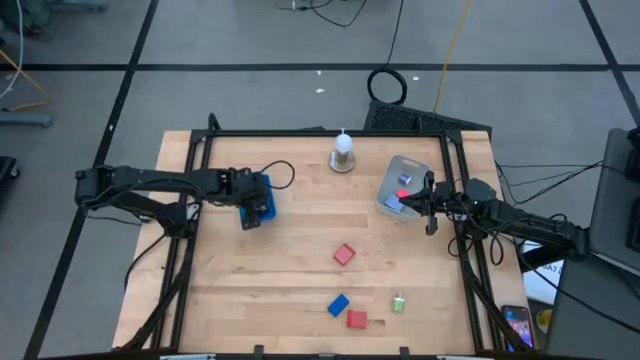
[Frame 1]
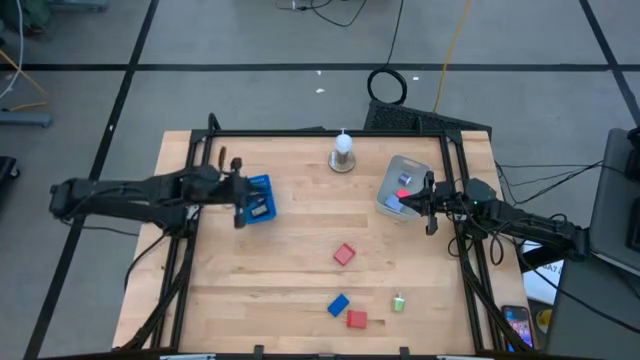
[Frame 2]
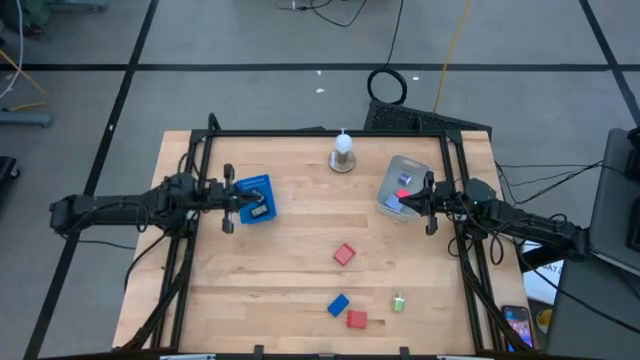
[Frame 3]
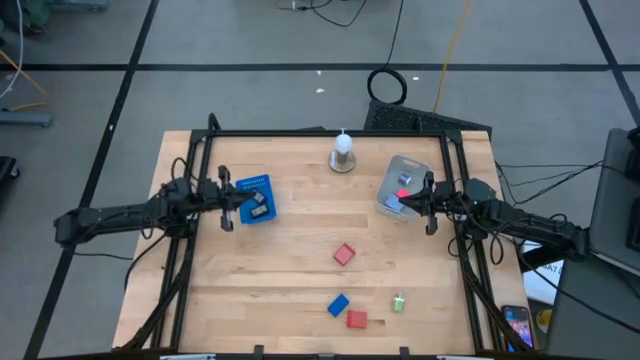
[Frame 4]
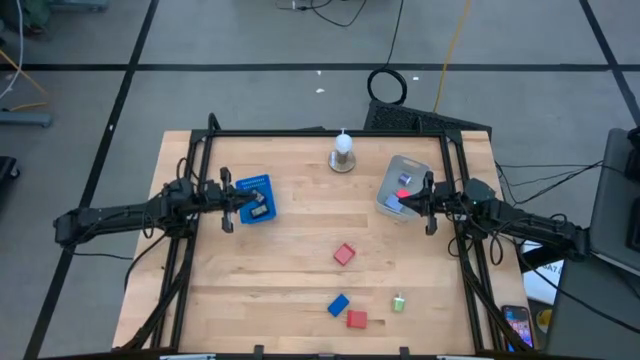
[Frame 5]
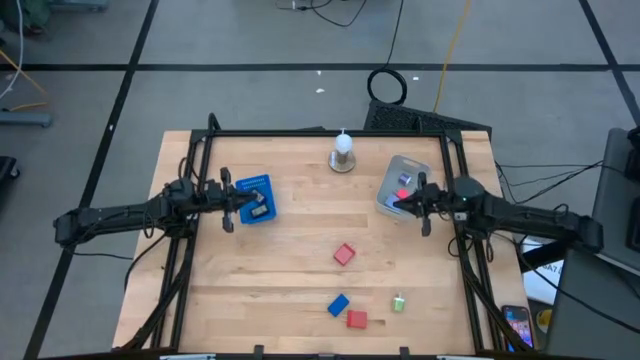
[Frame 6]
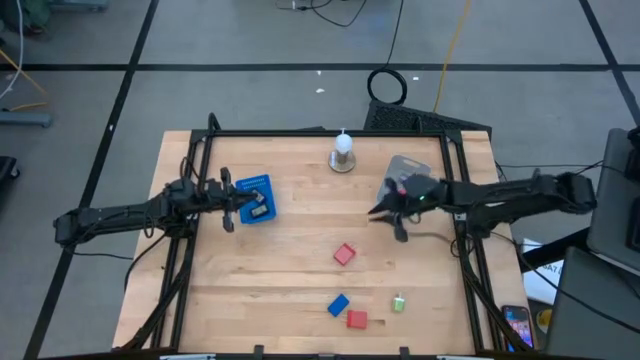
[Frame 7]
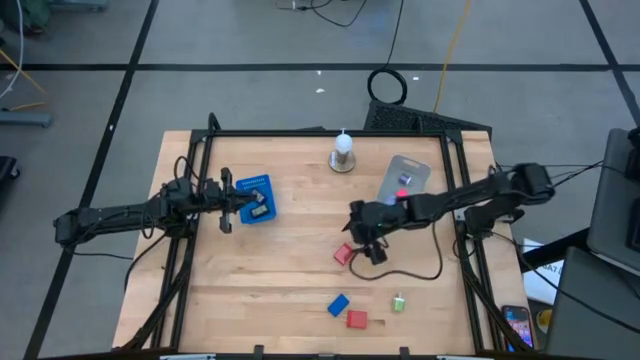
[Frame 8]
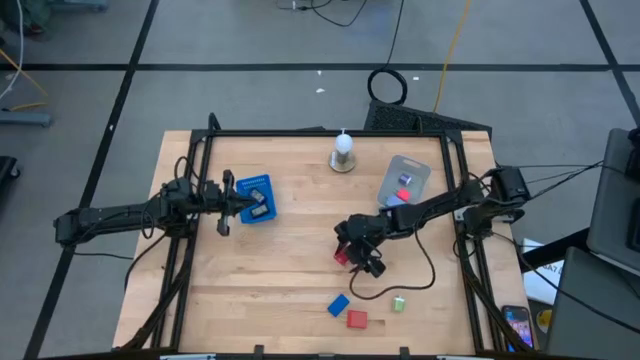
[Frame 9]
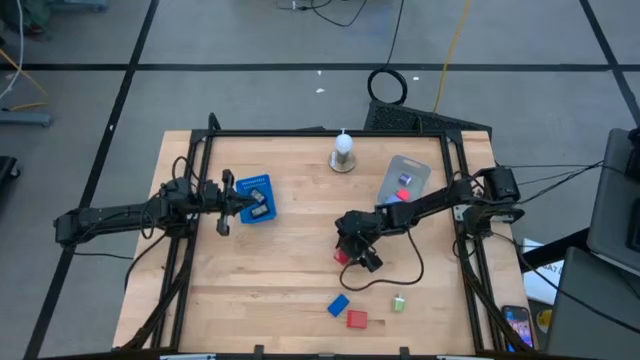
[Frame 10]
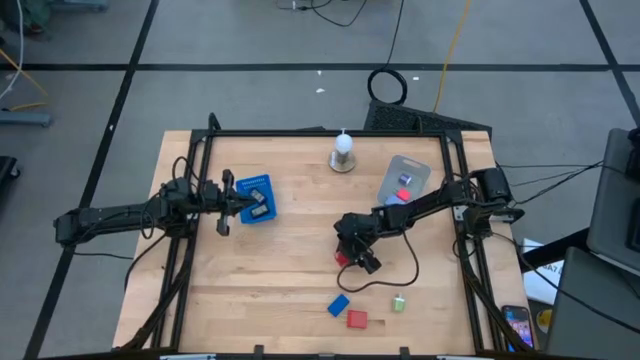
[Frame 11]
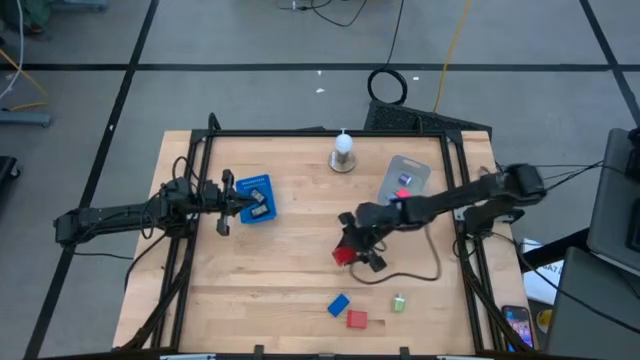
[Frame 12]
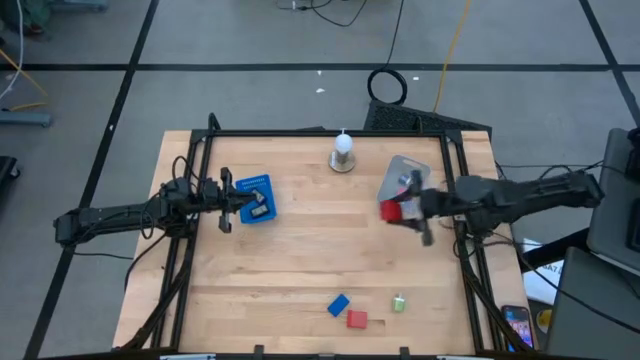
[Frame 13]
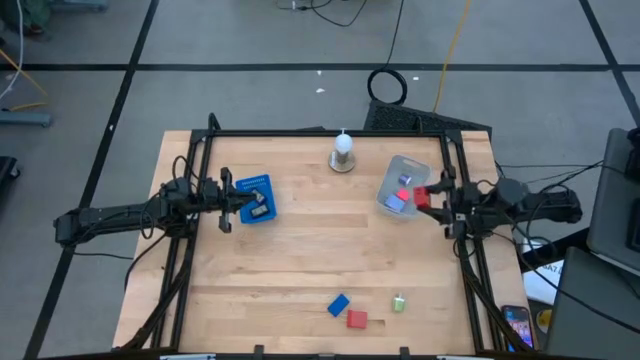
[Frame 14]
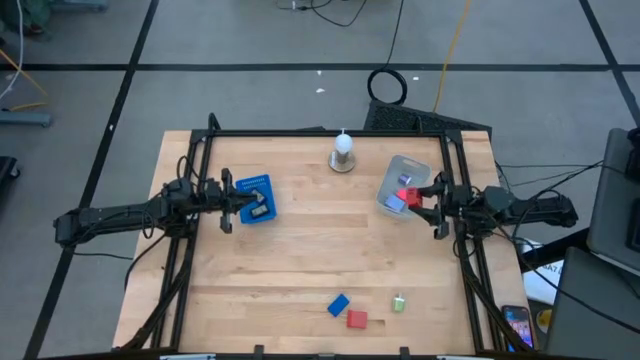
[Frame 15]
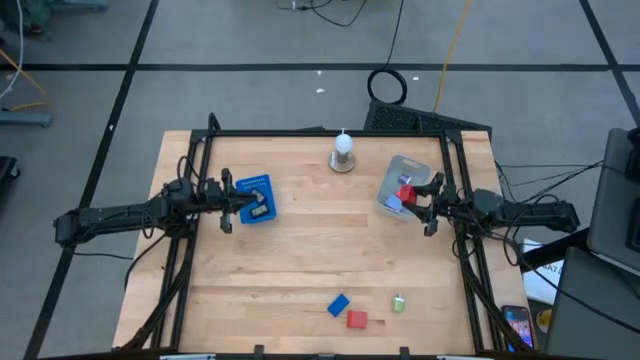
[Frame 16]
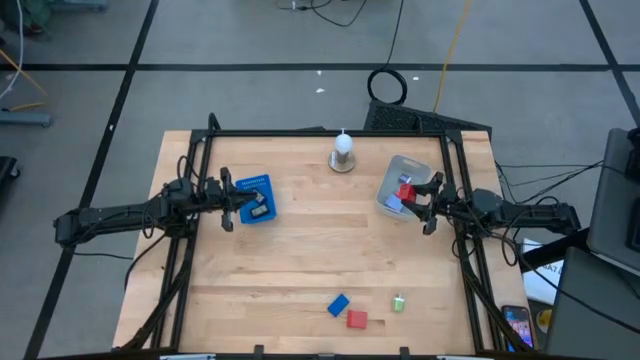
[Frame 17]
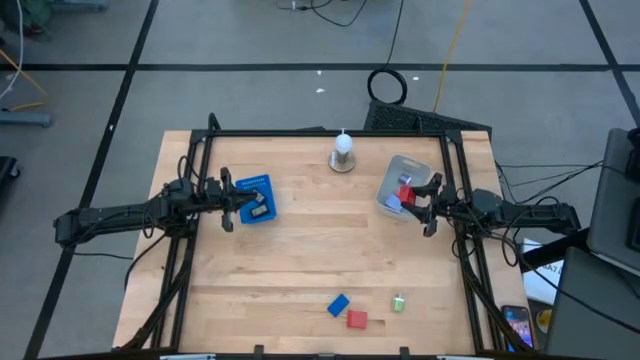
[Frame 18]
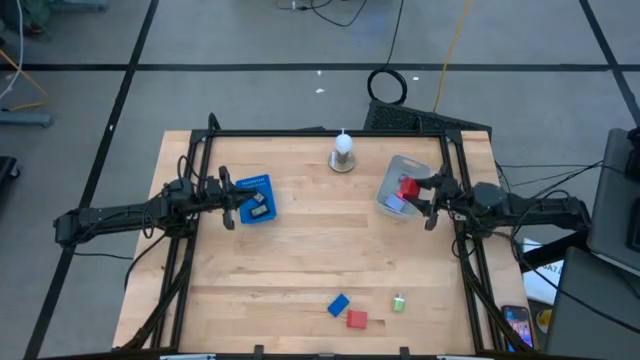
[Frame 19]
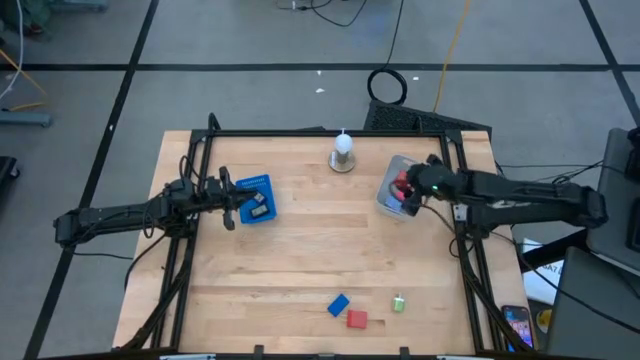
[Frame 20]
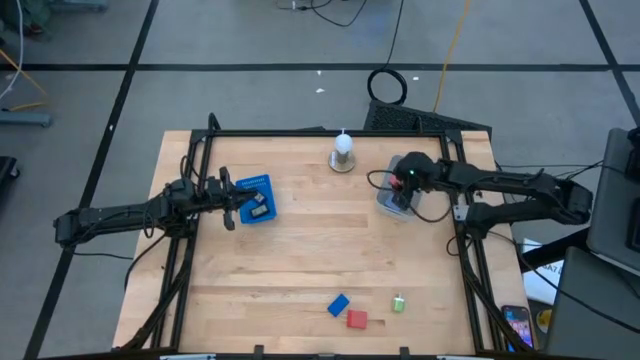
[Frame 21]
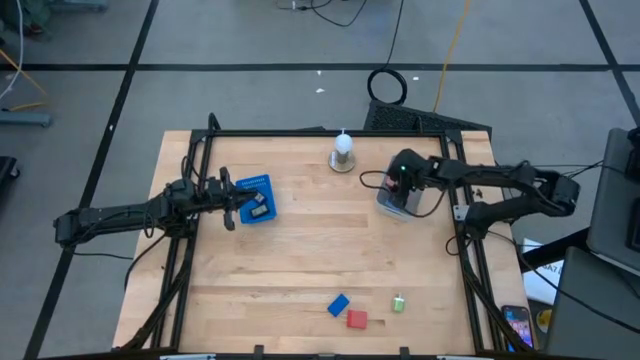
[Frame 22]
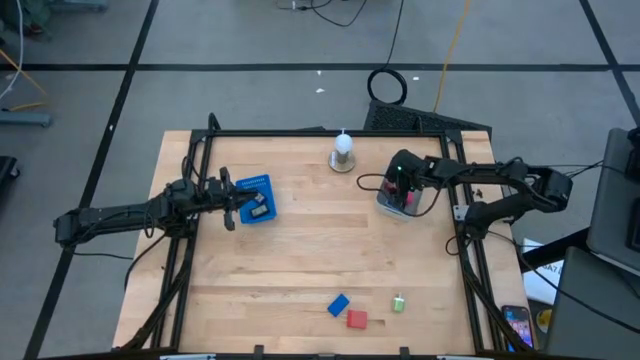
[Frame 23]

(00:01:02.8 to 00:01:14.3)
Task: Pick & Place Office items
Put the top red charger adapter into the gray bin

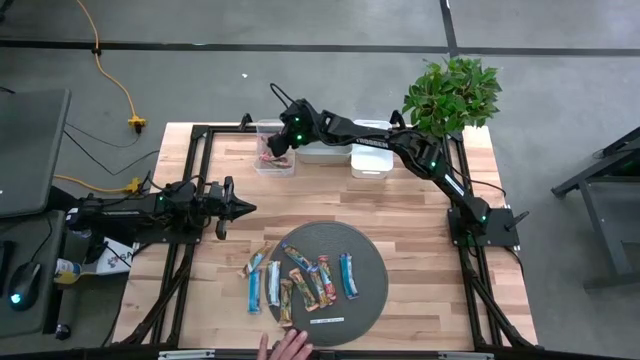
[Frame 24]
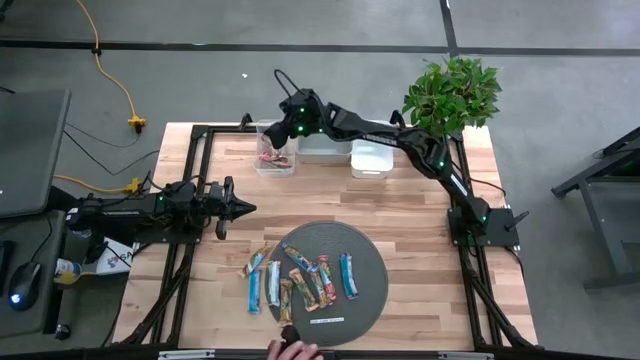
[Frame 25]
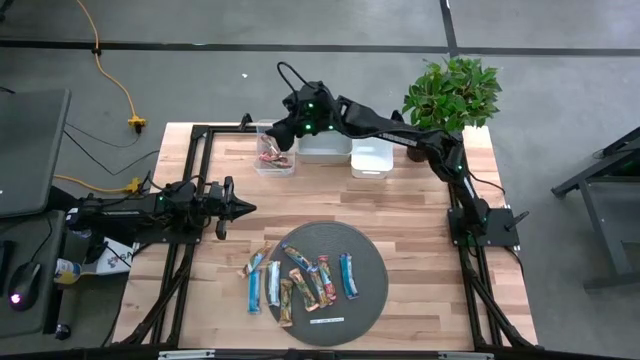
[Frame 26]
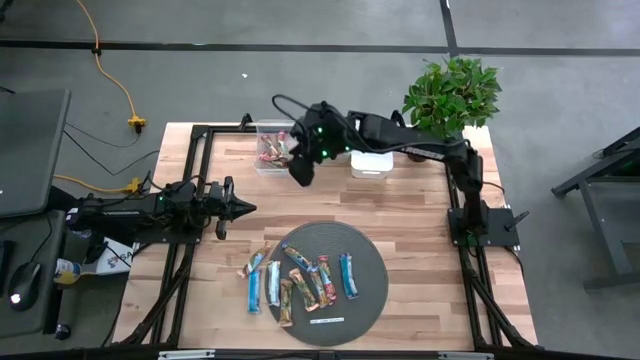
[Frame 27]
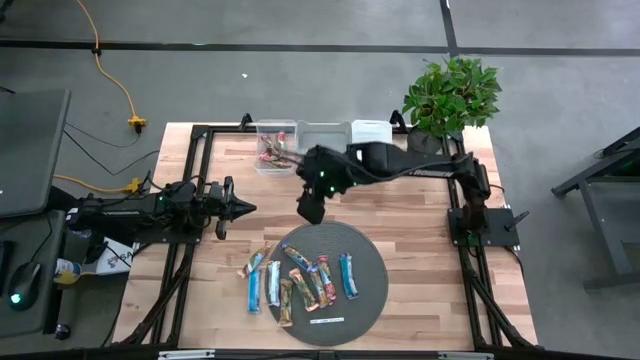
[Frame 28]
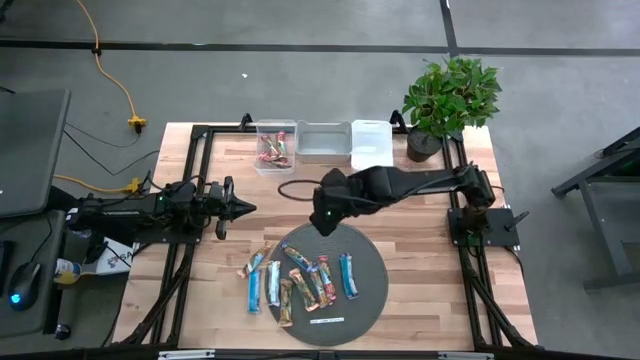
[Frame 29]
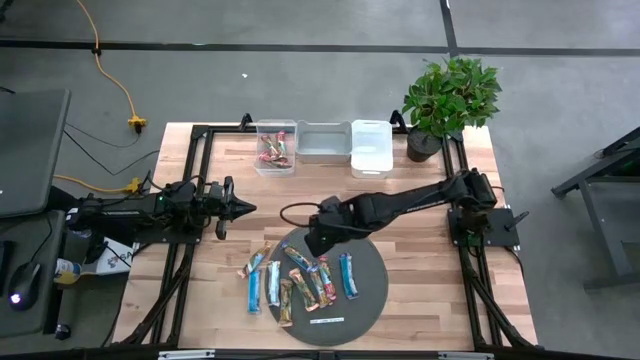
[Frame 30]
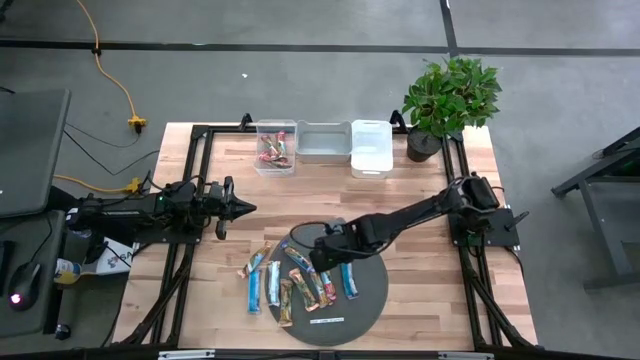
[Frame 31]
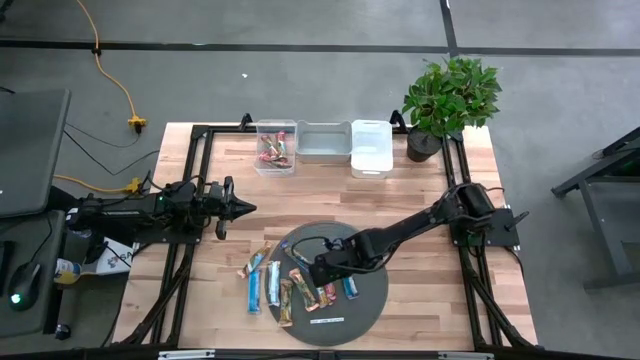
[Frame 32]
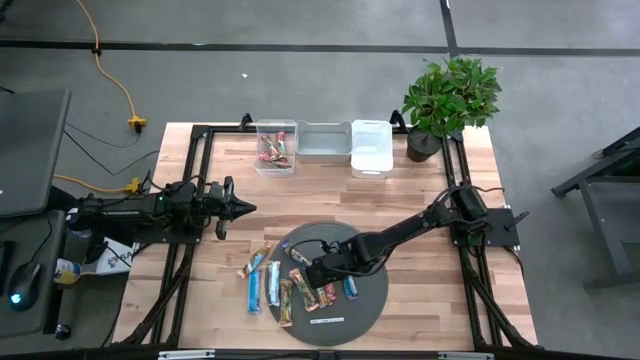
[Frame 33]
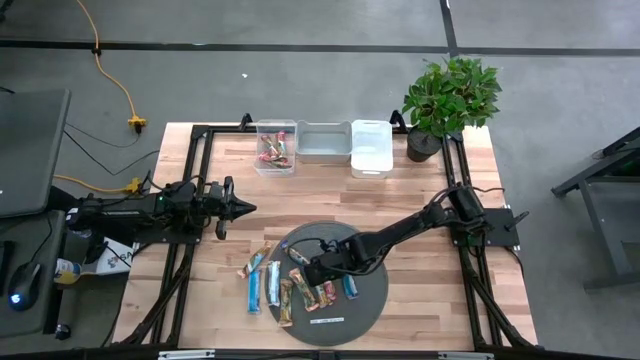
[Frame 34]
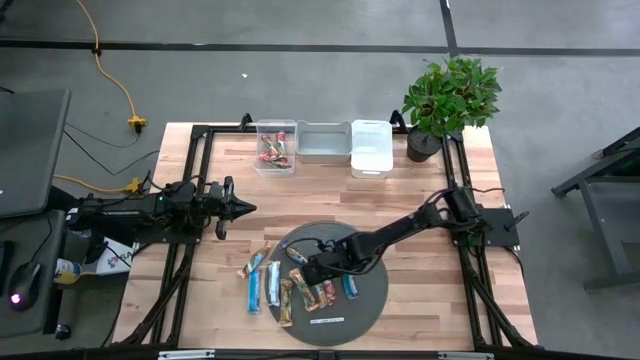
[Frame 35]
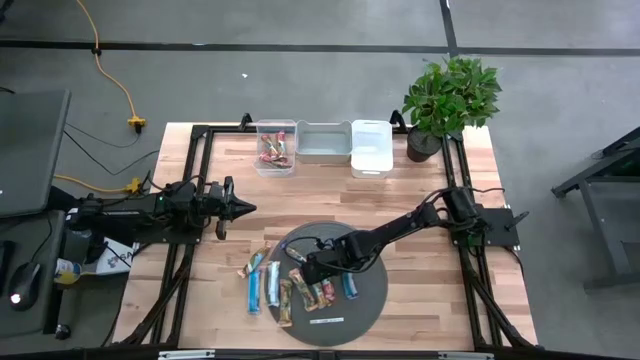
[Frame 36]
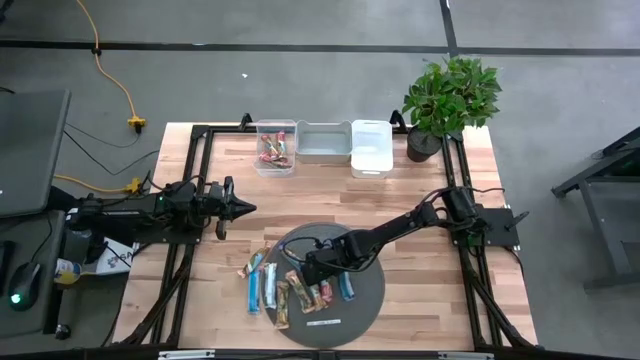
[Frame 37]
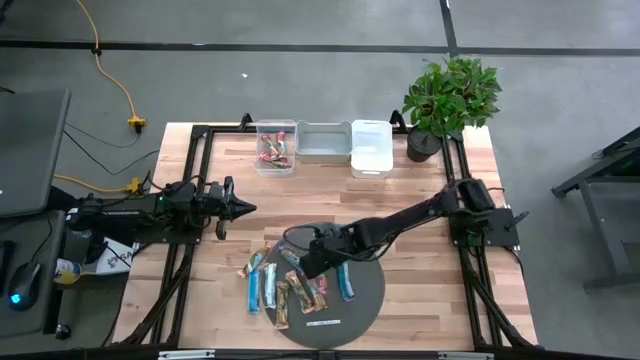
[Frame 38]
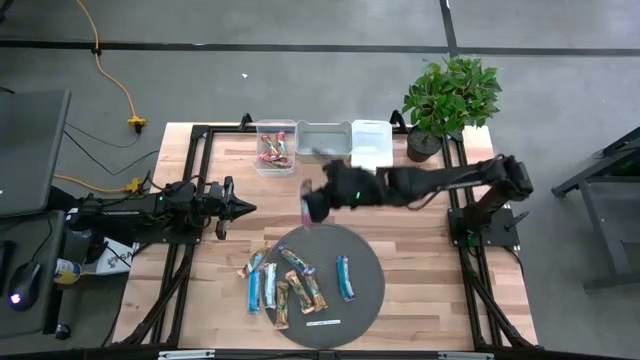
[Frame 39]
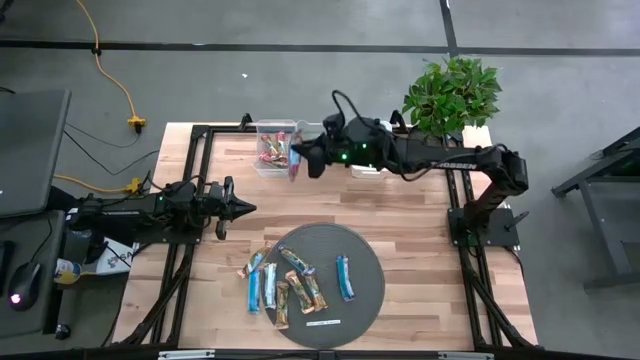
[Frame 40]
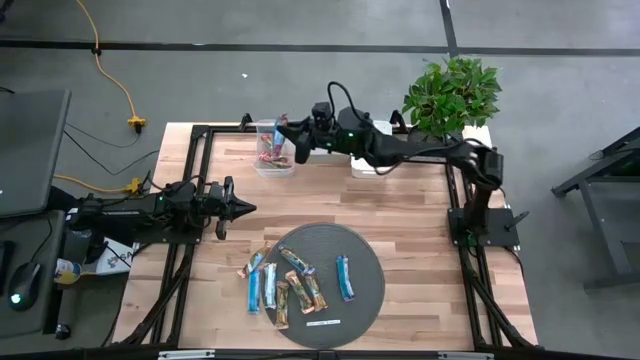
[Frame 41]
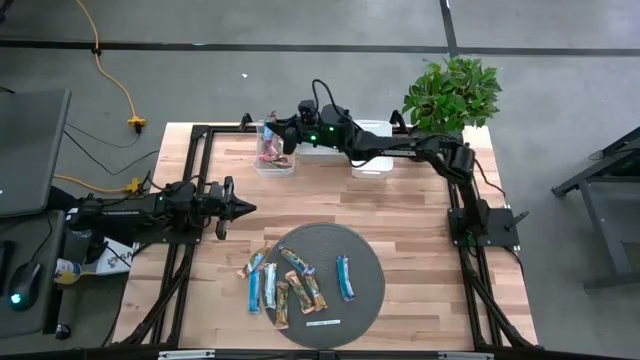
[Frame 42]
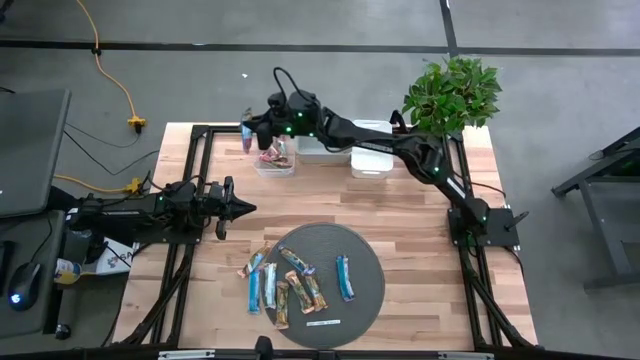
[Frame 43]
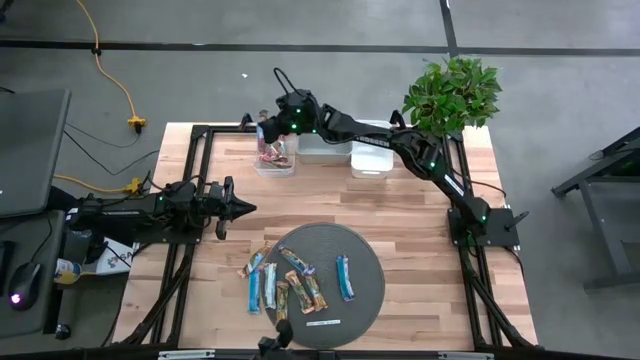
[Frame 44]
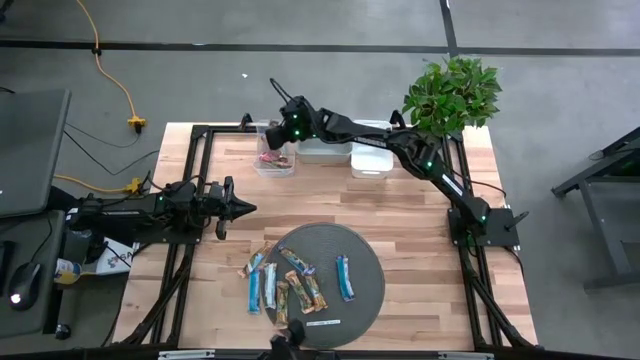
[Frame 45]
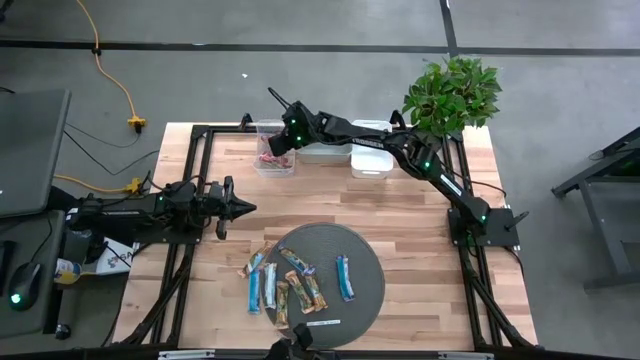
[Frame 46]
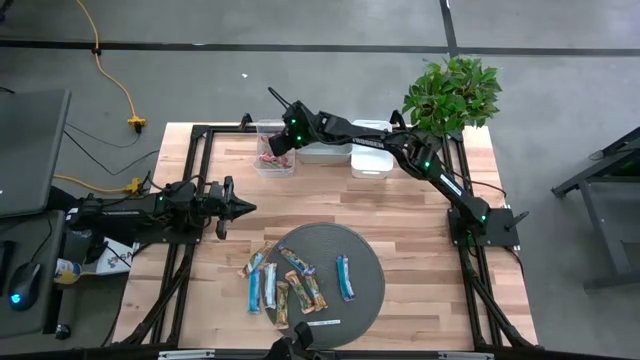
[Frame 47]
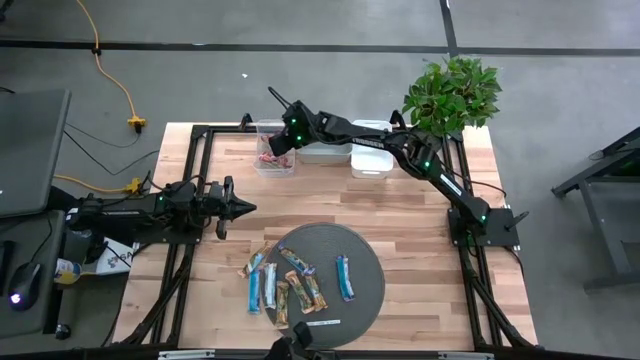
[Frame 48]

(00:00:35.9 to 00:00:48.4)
Task: Pick and place Granola Bars by type
Put the red granola bar into the transparent bin
